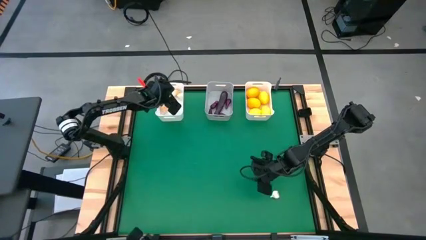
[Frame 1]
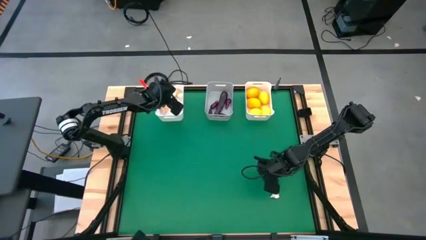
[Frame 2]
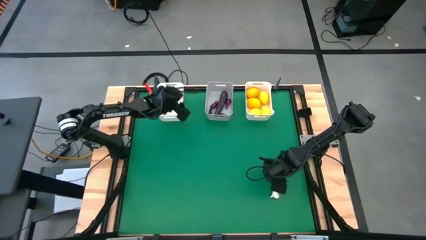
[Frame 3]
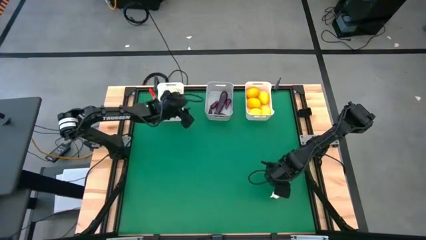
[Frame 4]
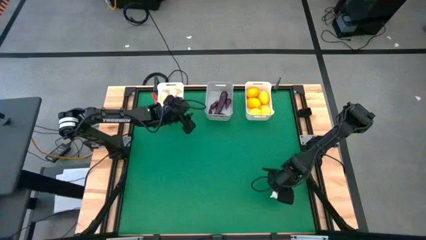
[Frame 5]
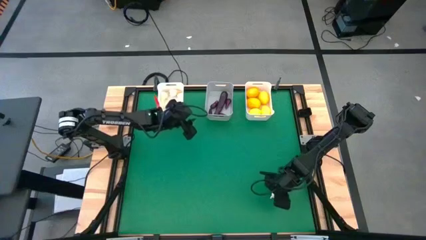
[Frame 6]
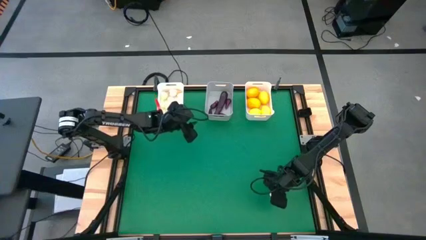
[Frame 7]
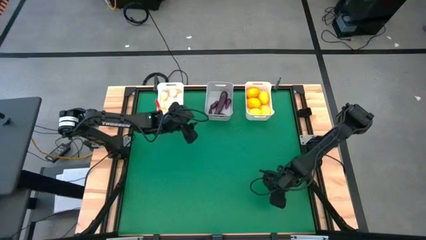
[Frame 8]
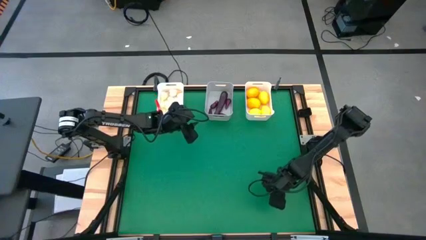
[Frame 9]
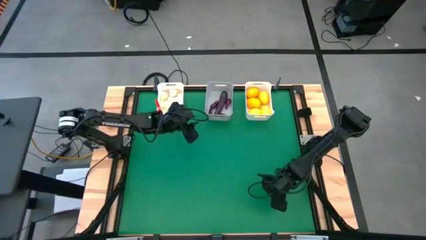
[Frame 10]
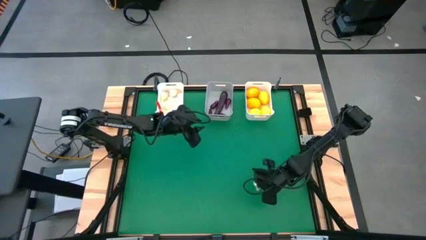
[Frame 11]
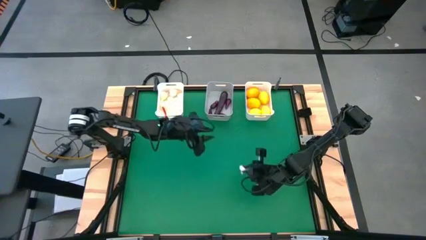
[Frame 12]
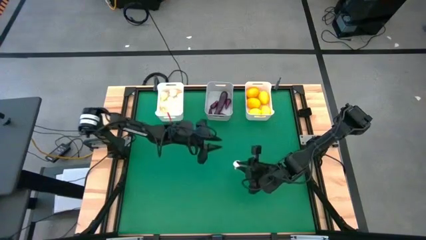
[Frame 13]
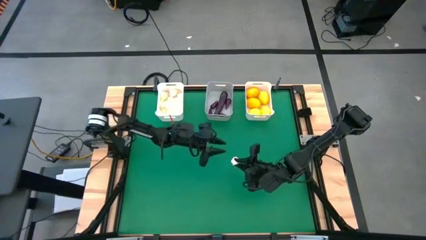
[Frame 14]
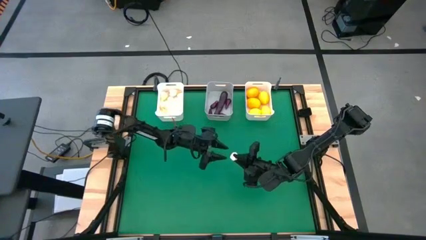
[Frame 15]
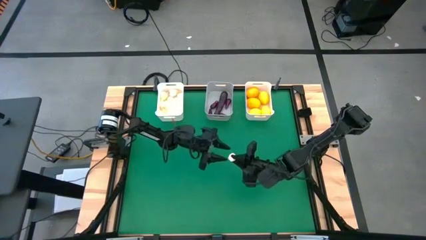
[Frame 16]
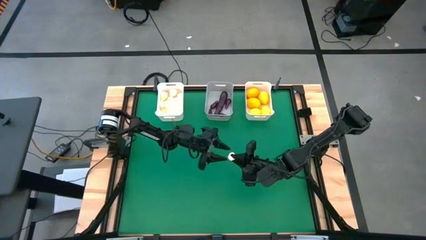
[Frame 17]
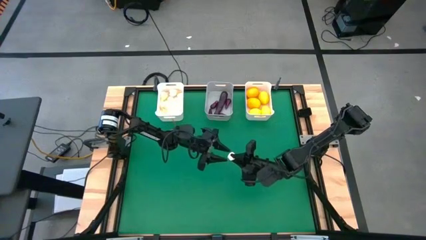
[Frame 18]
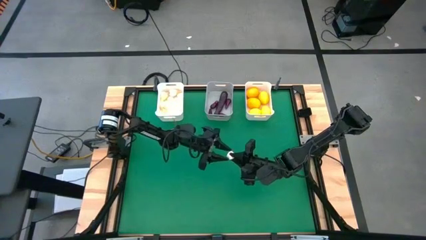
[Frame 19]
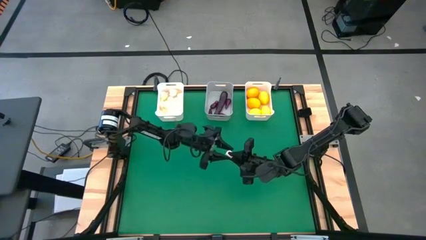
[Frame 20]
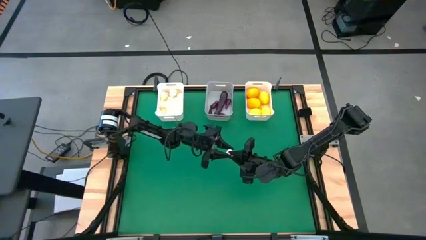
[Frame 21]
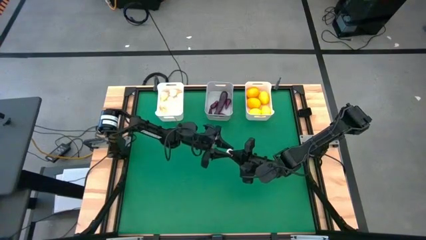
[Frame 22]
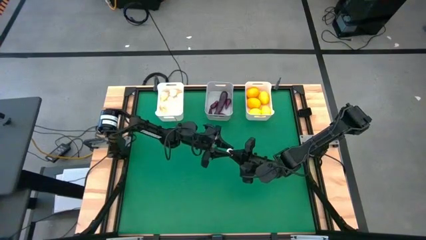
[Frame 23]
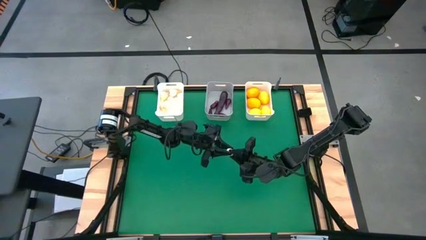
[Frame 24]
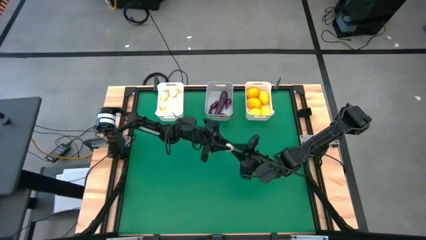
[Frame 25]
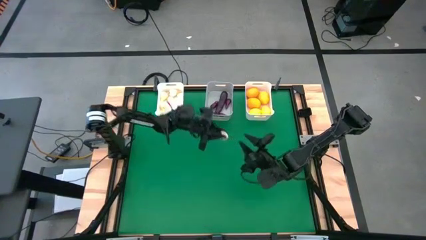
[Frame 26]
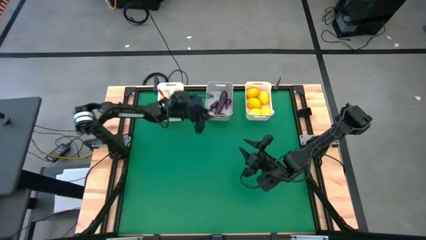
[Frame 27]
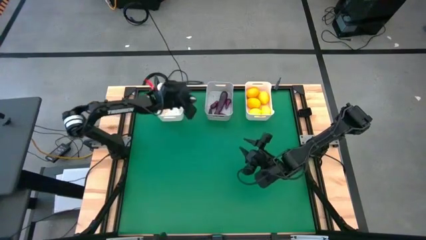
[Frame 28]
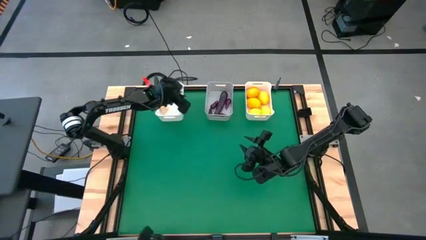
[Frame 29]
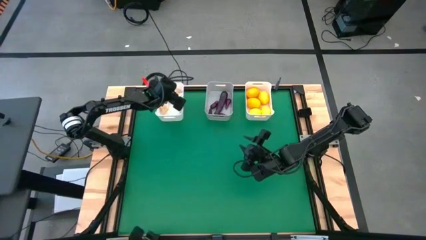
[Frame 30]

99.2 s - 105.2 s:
Task: Sort produce into baskets
Put the garlic into the left white bin

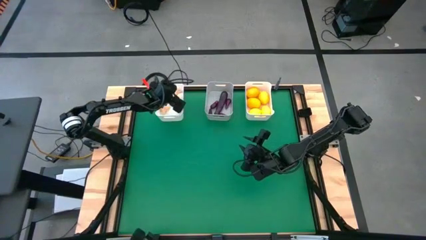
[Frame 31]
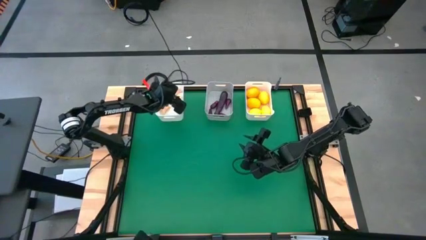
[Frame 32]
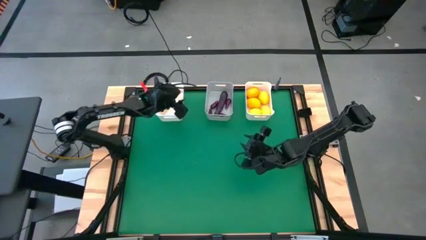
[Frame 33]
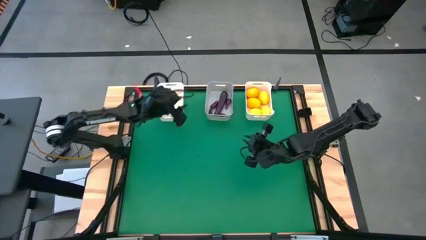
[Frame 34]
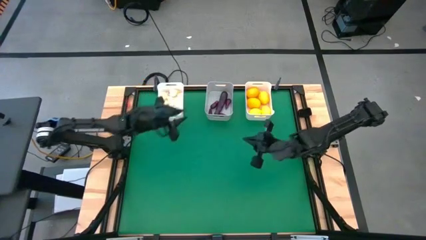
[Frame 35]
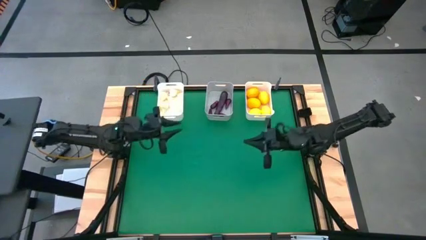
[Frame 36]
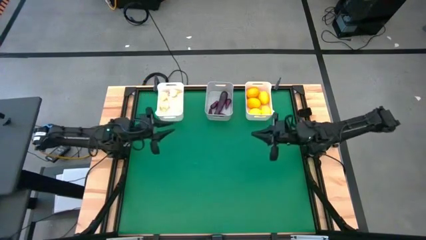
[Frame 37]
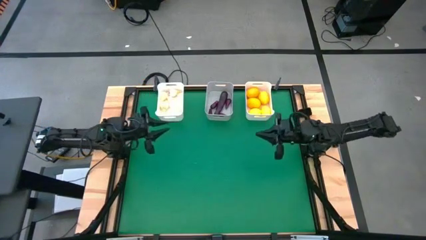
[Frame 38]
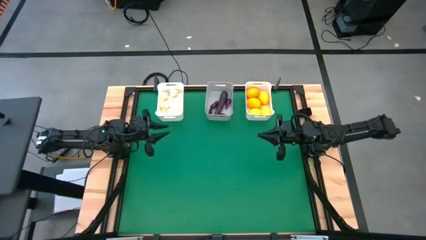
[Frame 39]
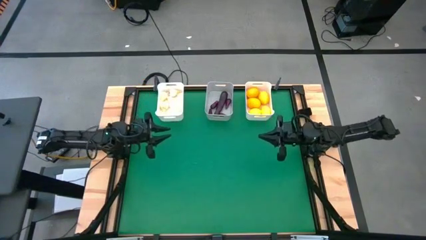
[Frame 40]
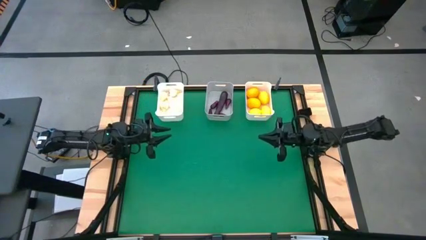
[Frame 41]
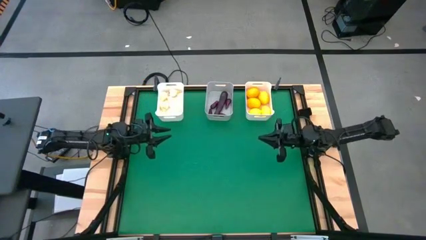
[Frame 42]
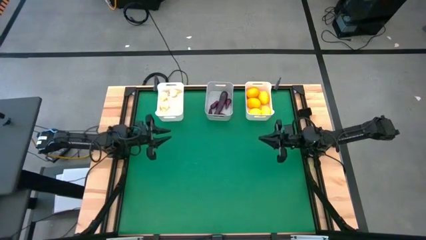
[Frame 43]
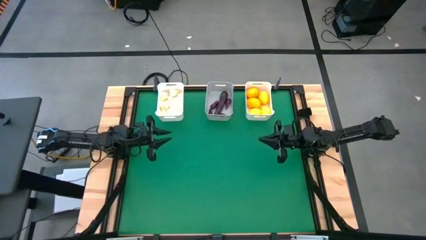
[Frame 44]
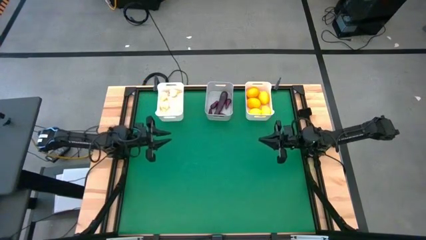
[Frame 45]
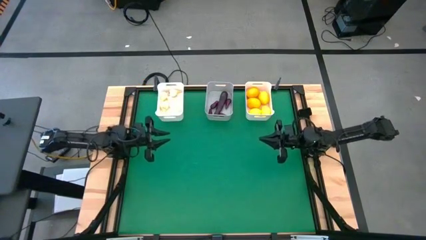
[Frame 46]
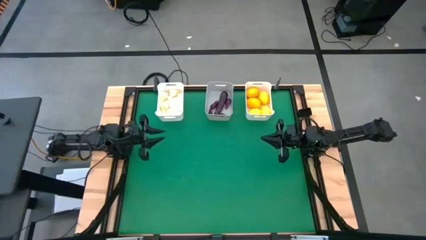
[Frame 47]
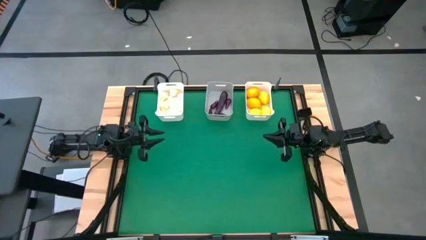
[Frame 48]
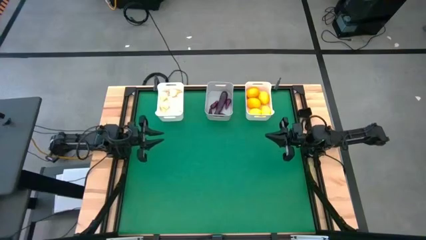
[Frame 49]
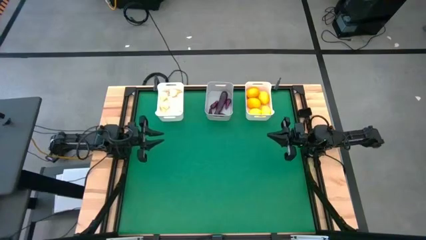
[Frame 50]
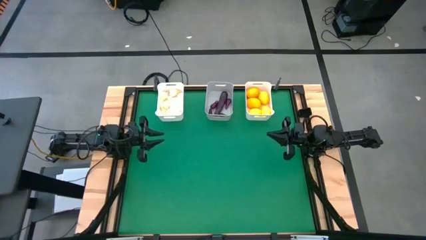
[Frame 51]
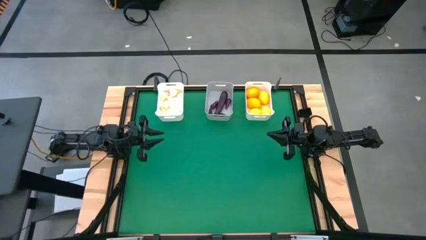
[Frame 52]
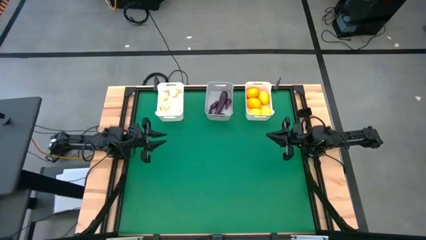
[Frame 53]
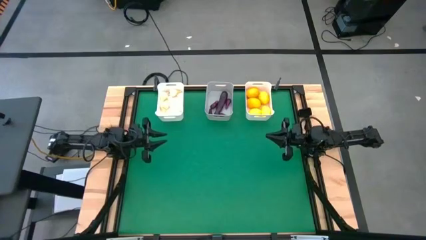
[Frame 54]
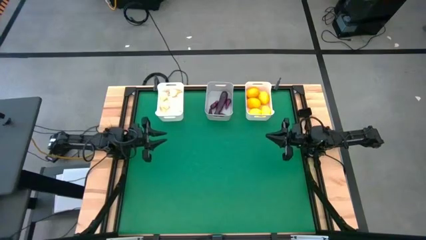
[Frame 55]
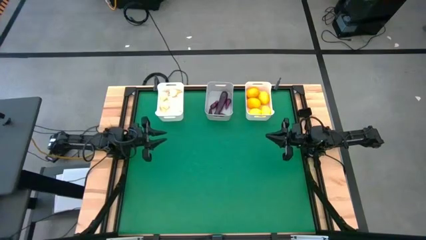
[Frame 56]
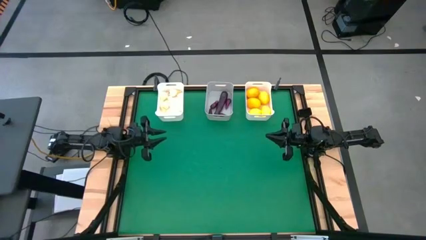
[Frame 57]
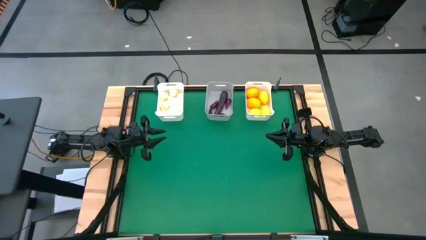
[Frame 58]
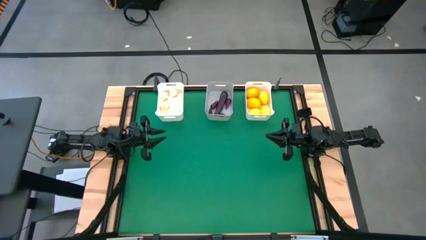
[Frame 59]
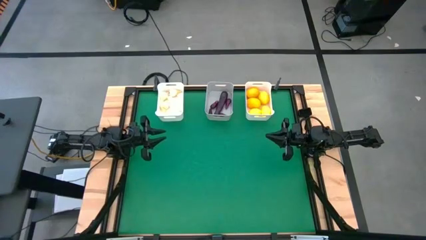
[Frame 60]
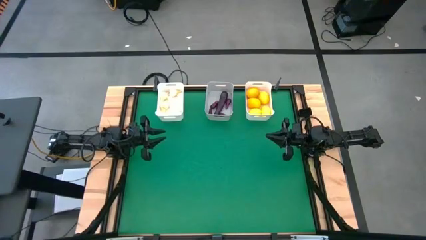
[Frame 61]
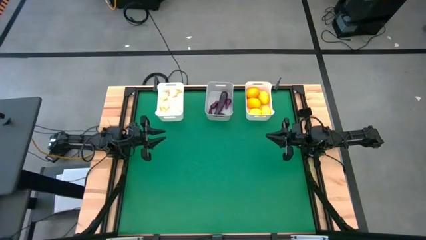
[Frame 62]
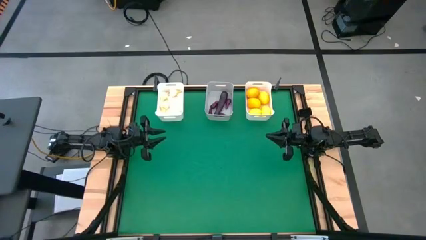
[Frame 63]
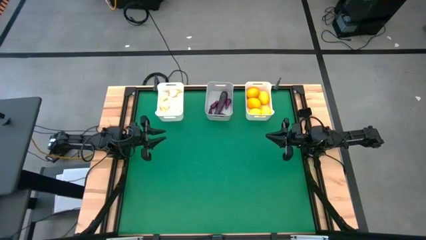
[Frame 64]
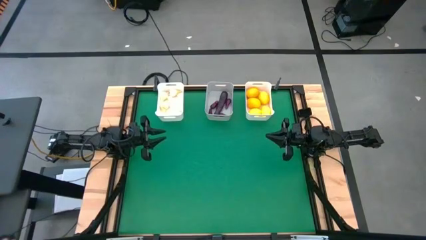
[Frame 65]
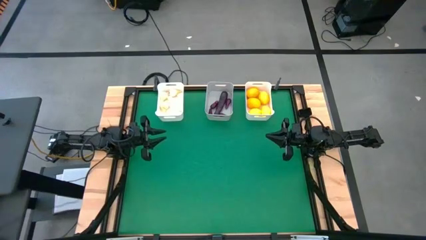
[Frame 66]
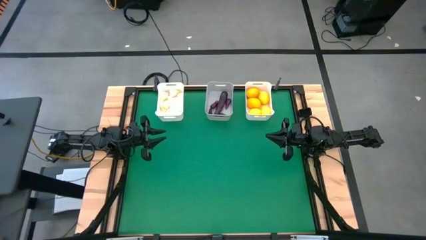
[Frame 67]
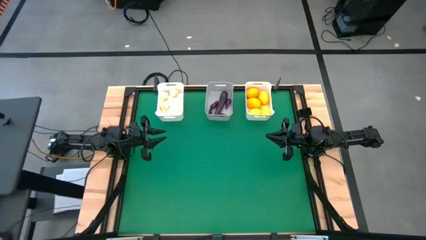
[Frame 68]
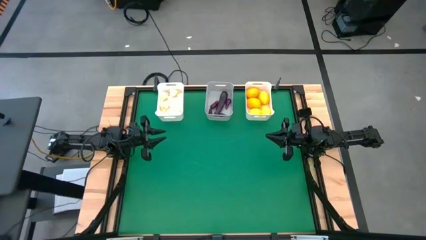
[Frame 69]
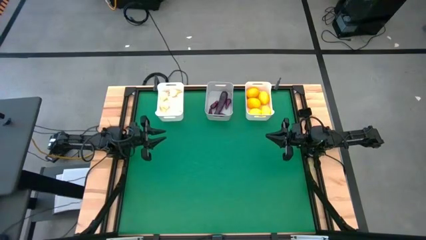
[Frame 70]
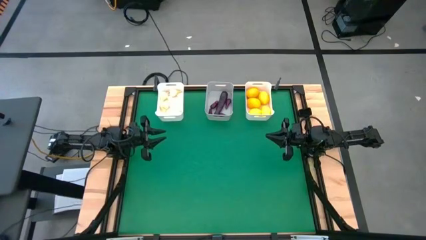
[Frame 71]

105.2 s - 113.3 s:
Return to home position

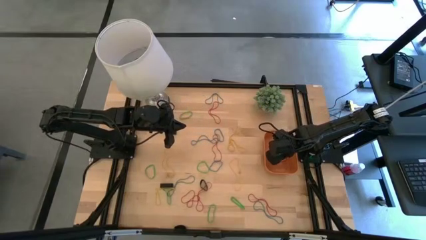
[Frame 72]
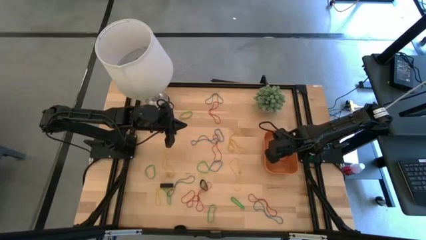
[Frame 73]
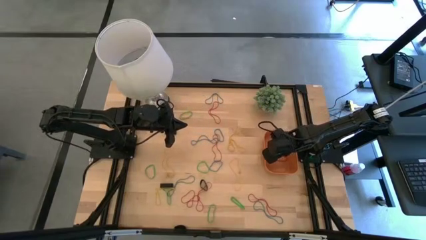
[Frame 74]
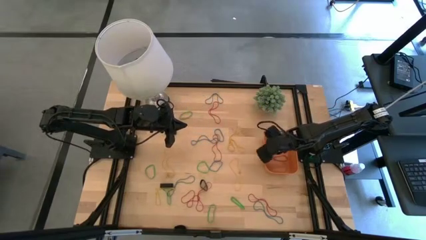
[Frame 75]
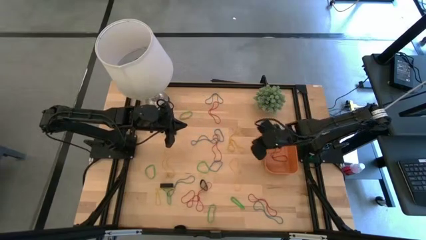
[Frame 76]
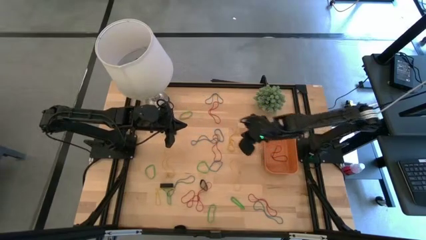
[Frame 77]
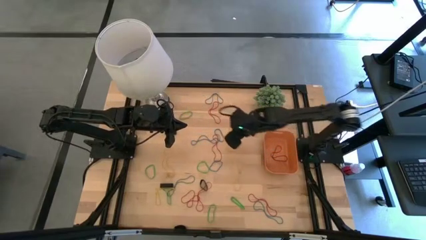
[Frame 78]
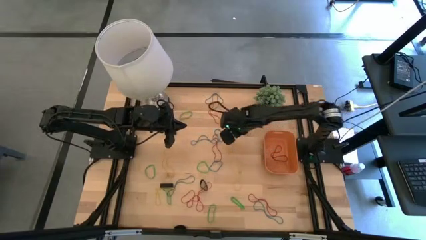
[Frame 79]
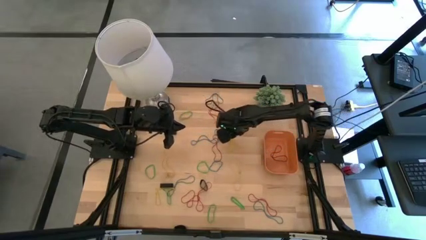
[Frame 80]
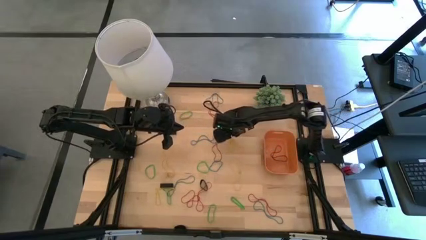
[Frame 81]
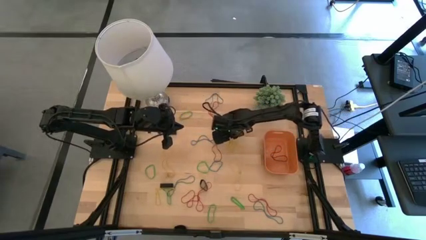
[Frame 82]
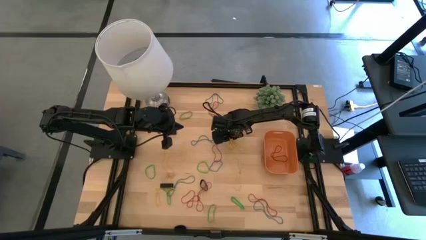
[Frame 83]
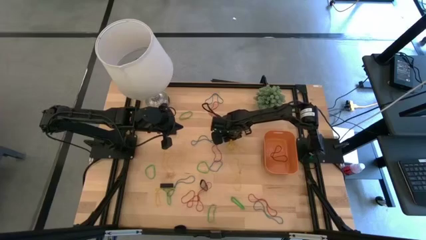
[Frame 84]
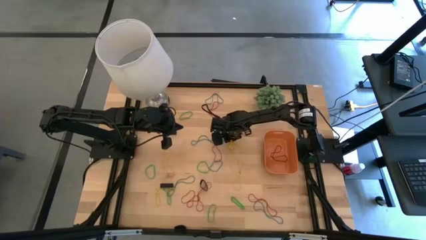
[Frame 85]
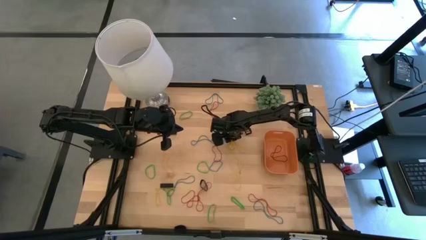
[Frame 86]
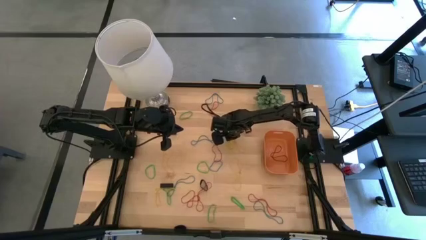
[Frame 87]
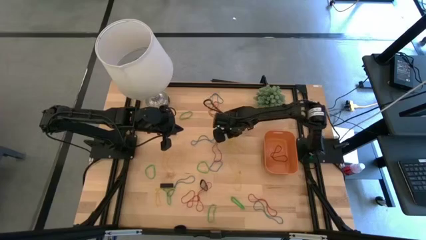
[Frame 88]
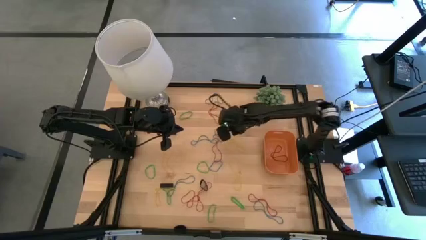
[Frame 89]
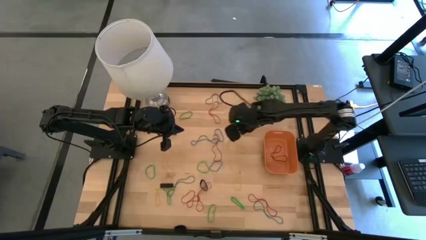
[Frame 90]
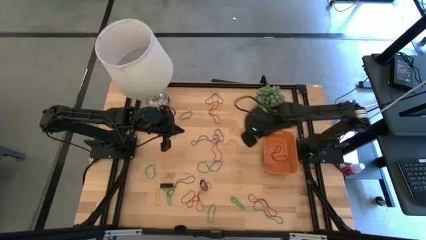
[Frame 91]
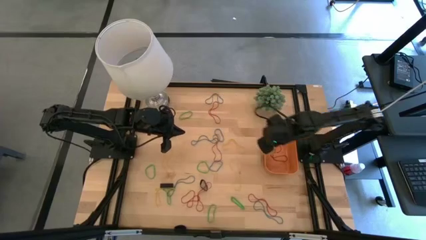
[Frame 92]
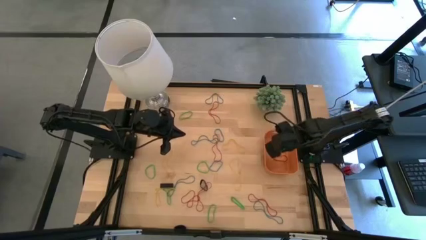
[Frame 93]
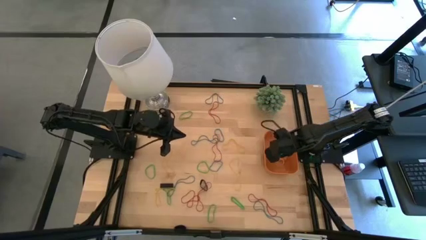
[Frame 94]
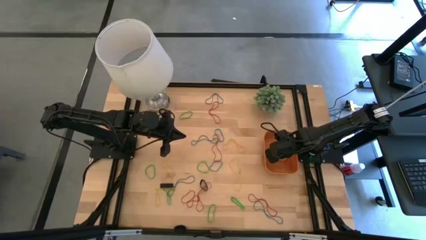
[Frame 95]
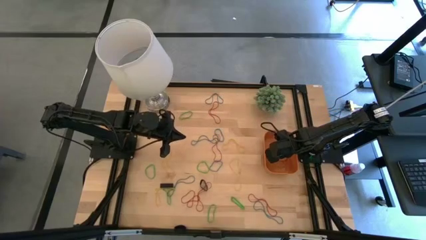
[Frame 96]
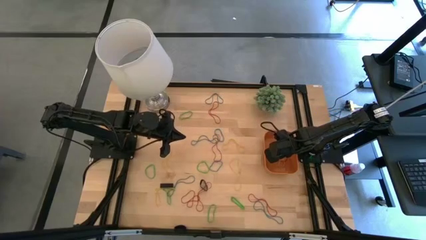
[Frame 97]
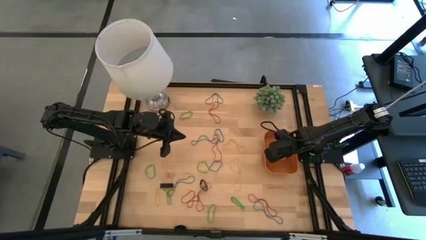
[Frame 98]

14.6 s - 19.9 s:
Task: Pick and place rubber bands into bin
Put the yellow rubber band into the orange bin
